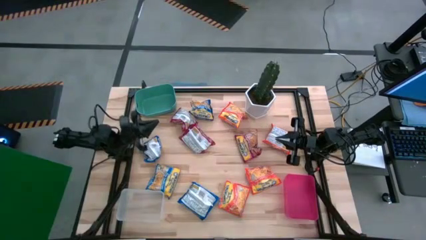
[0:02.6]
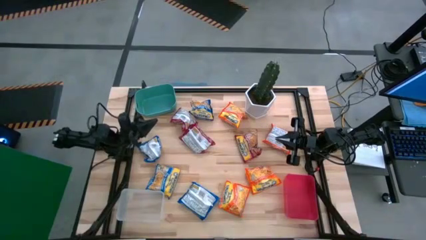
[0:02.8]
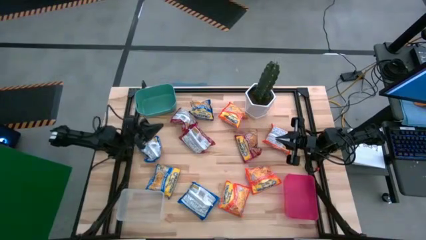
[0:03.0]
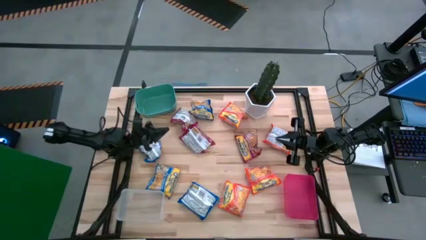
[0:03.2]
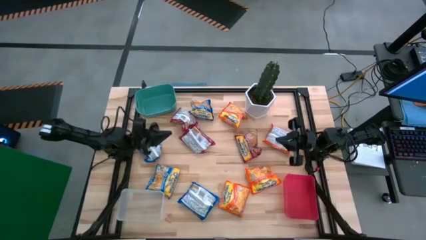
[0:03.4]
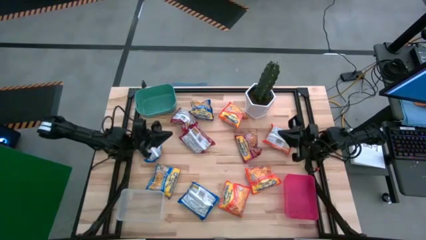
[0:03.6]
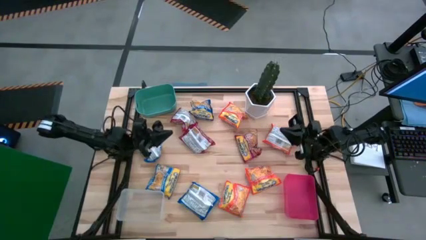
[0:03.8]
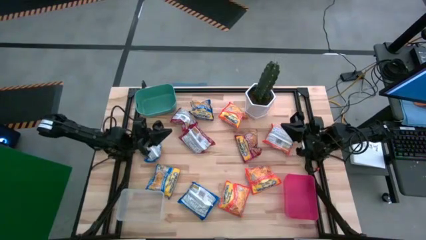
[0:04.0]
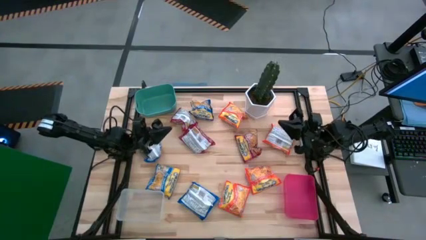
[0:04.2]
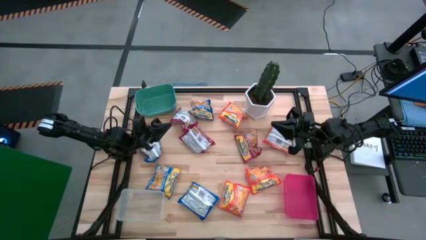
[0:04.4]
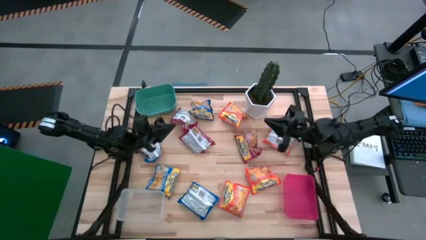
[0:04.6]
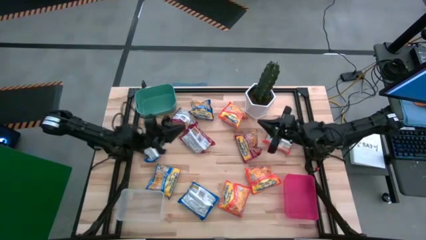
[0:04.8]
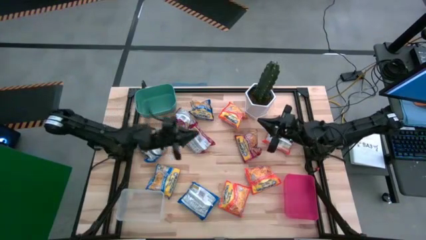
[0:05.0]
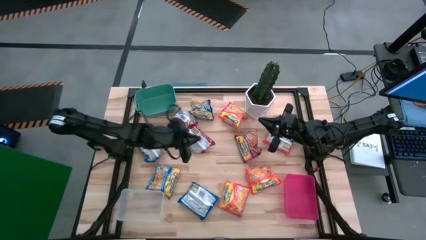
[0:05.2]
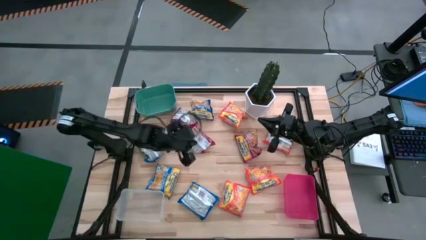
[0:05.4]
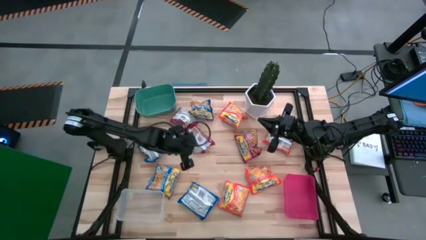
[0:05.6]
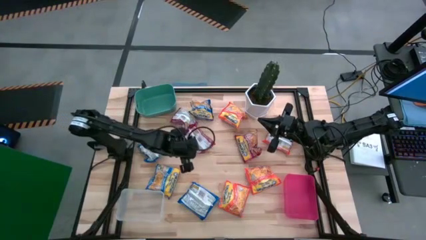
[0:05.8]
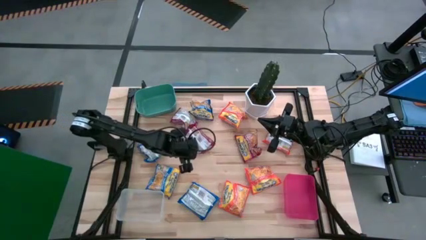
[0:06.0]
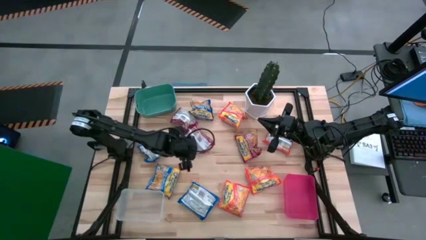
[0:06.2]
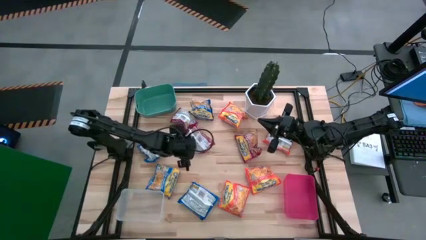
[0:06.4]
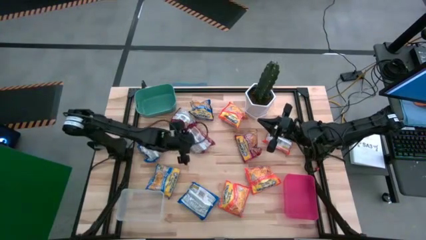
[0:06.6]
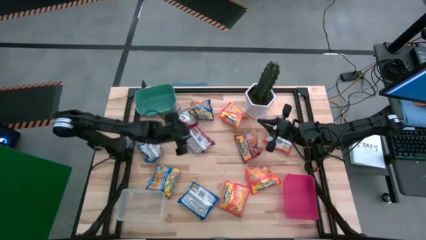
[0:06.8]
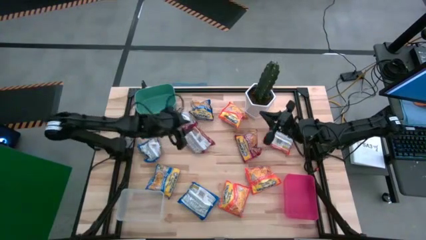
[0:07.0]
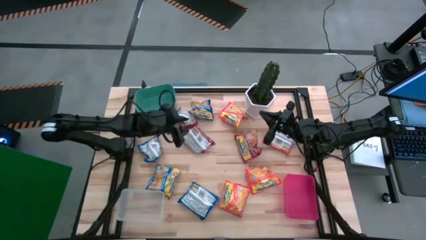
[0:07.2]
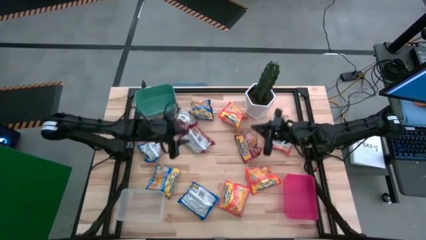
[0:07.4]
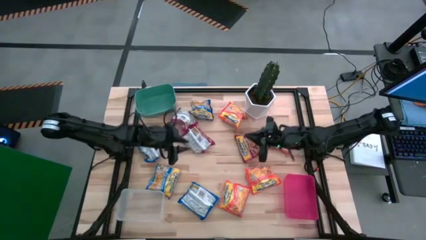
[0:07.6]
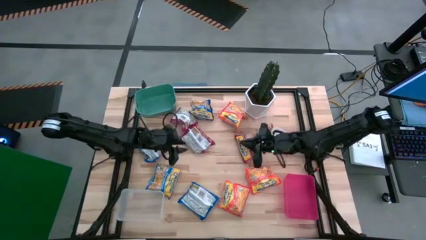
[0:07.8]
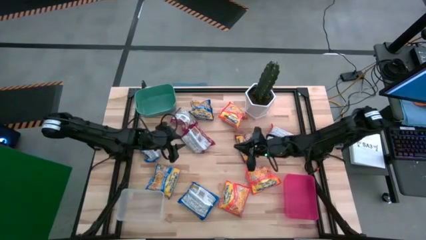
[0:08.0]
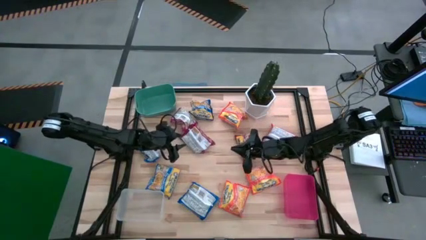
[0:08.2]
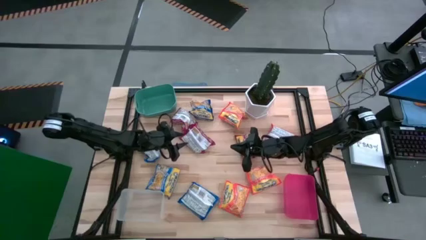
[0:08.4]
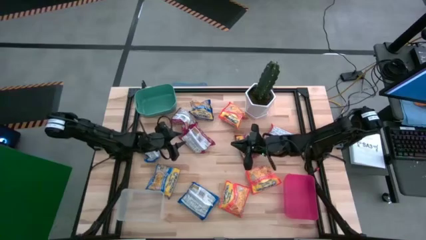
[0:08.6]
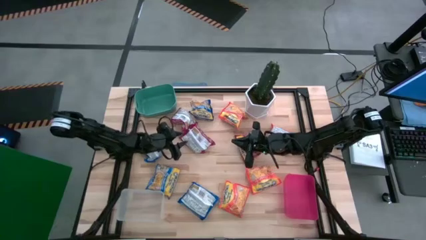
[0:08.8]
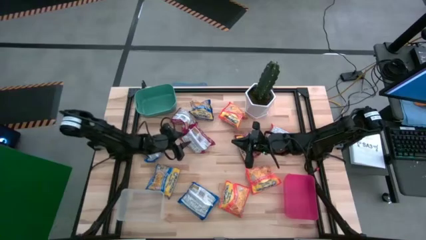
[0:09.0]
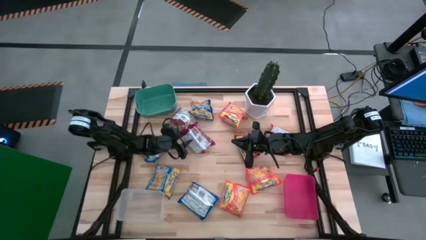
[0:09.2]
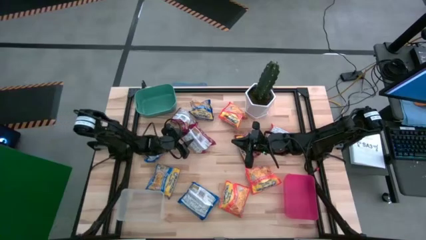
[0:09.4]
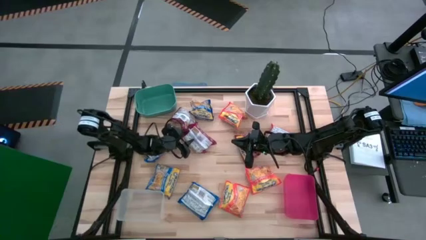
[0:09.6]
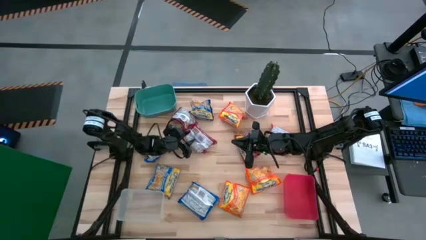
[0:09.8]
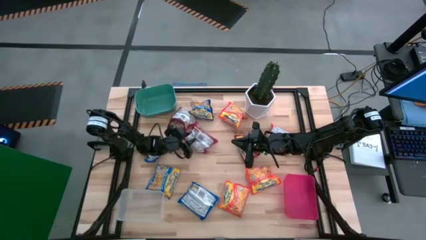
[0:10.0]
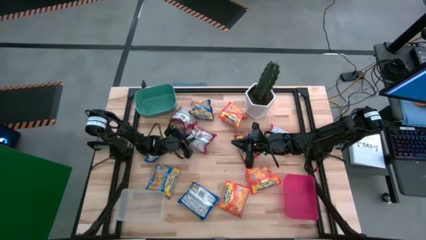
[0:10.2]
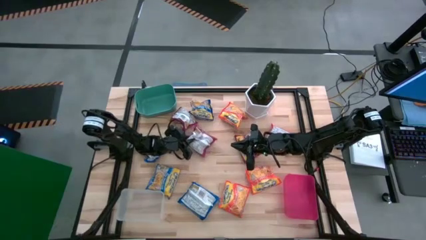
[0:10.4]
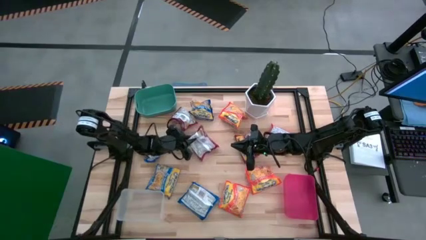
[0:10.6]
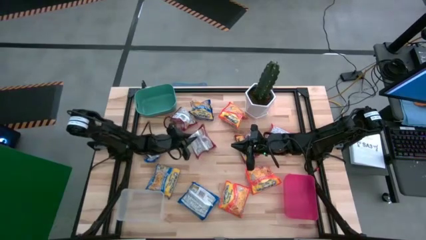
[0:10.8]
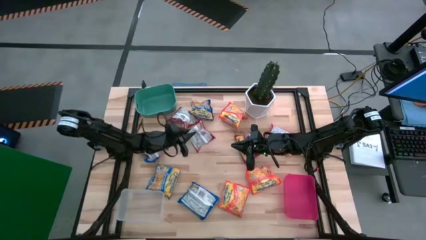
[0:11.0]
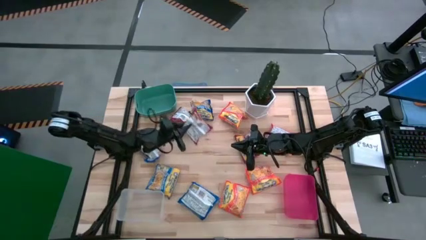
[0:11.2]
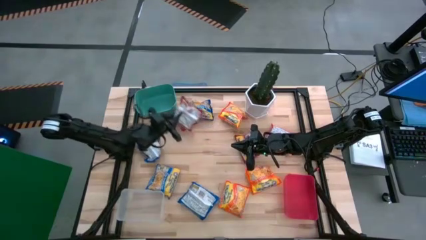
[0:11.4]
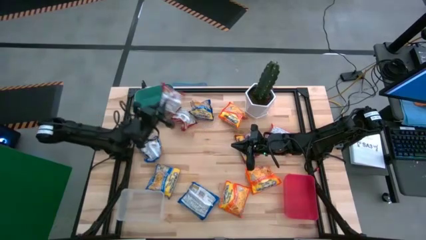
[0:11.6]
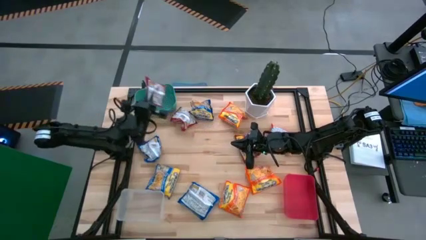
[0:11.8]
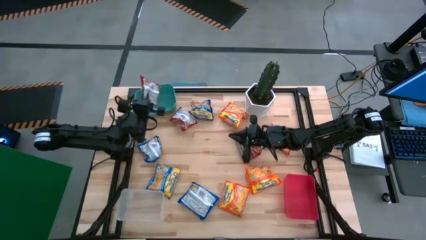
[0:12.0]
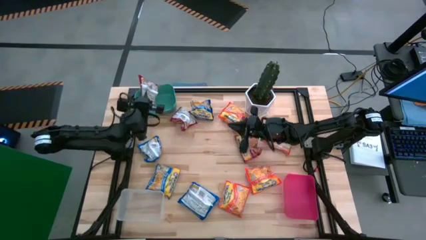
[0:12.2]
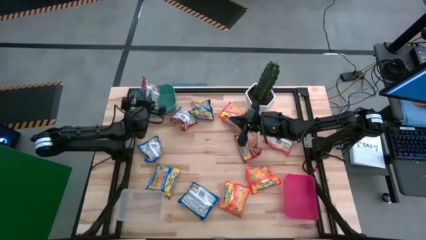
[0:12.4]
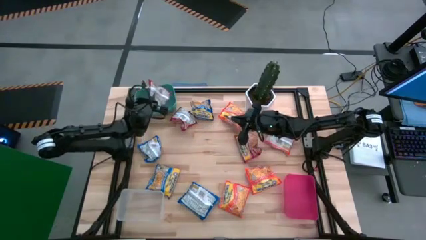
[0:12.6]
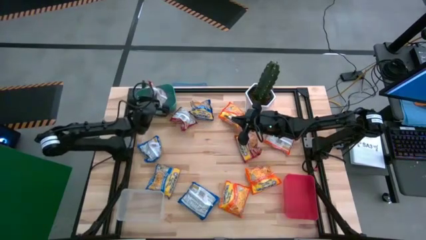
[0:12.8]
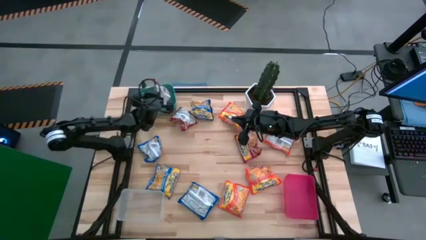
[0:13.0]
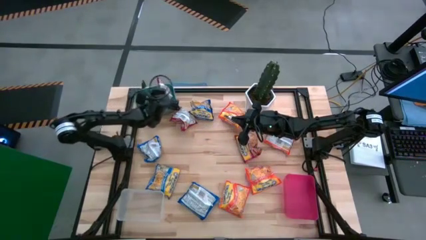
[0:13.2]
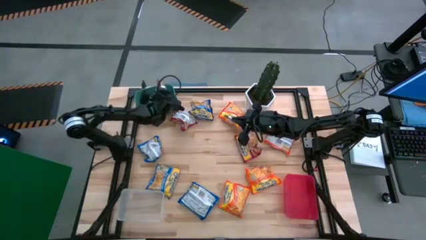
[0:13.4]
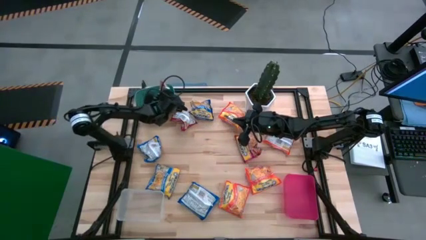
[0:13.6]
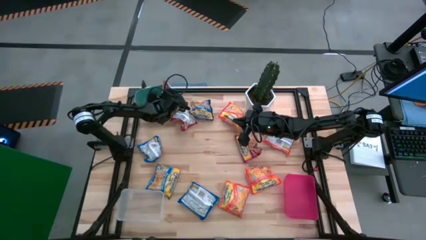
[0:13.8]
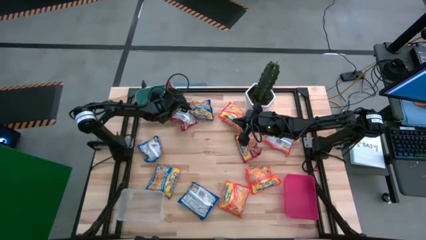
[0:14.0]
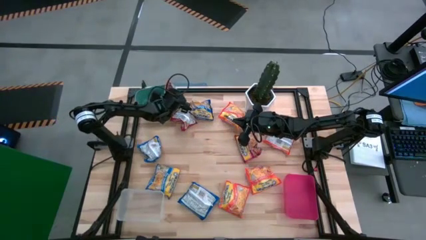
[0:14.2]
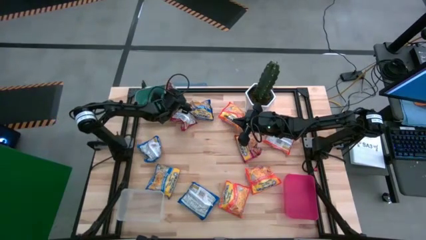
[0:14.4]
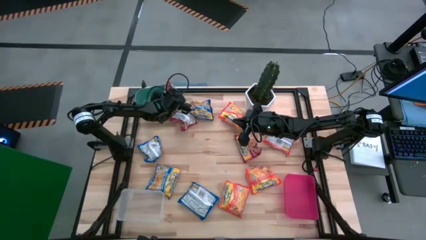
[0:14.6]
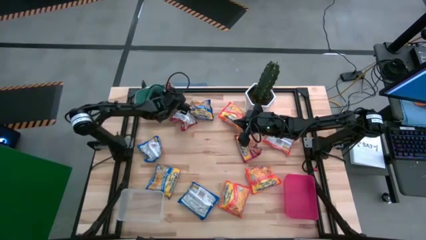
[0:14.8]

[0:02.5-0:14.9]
Task: Sort Maruchan noodles
Put the middle red noodle pack into the green bin

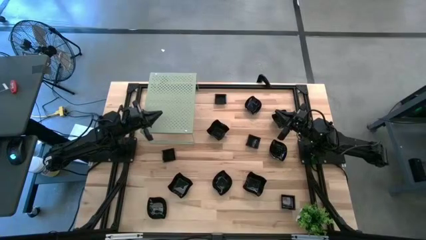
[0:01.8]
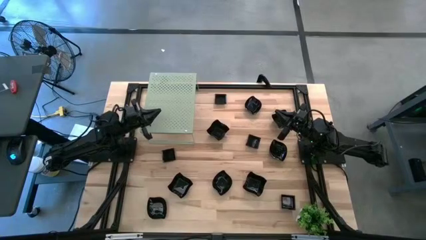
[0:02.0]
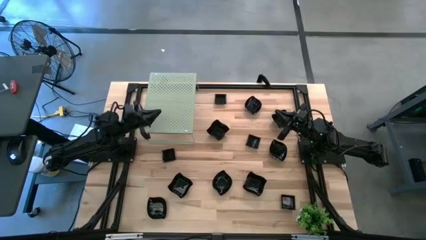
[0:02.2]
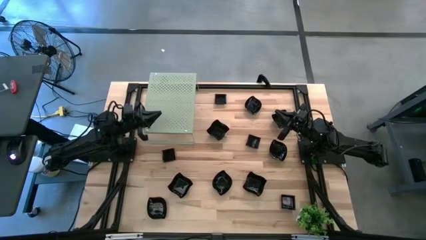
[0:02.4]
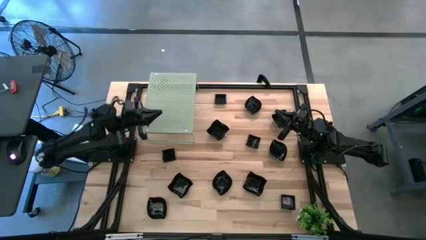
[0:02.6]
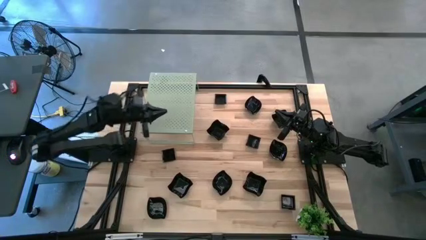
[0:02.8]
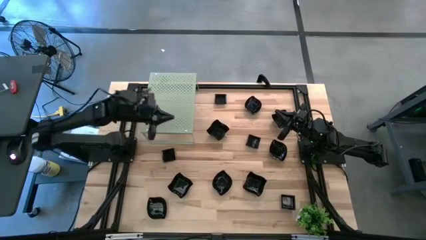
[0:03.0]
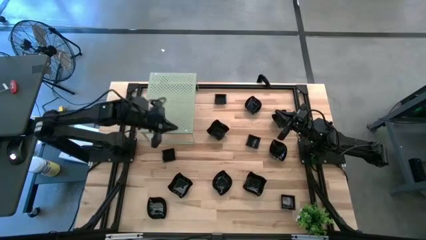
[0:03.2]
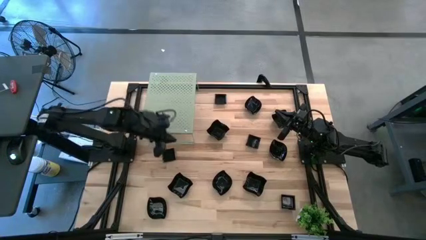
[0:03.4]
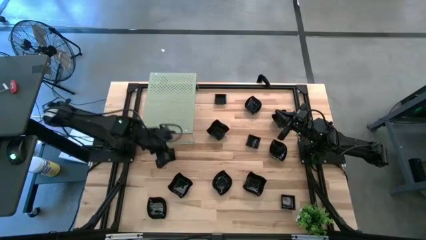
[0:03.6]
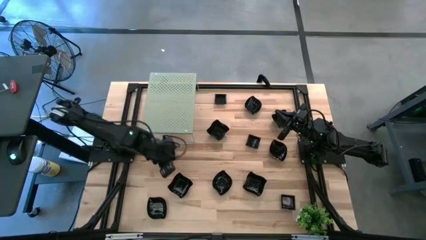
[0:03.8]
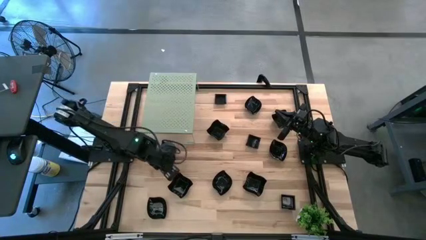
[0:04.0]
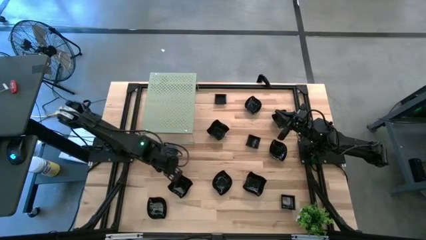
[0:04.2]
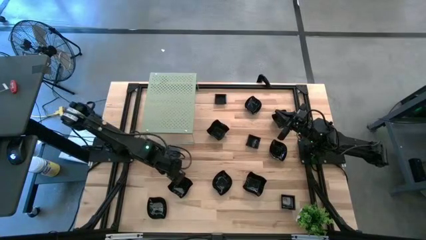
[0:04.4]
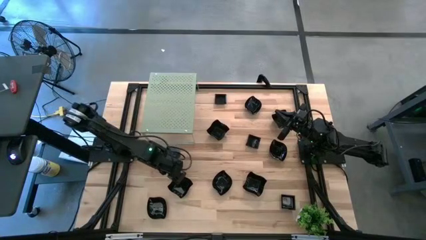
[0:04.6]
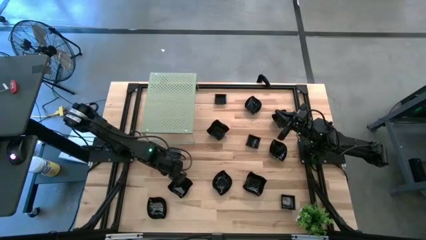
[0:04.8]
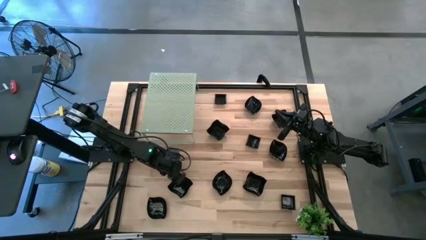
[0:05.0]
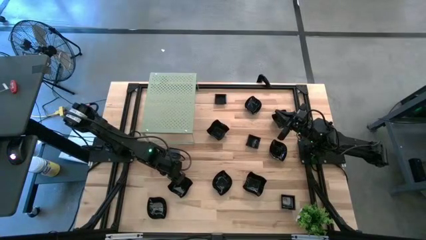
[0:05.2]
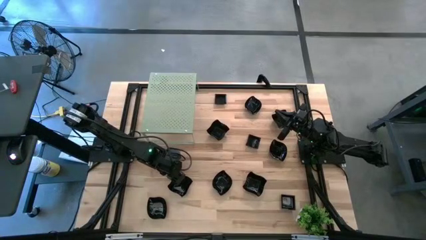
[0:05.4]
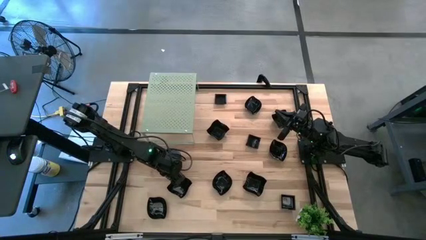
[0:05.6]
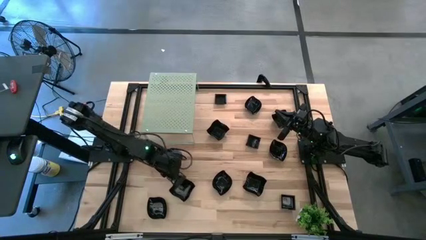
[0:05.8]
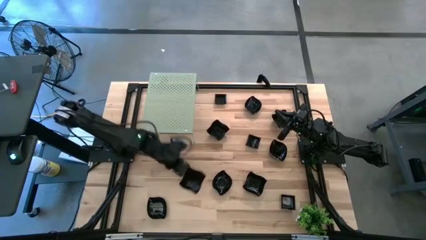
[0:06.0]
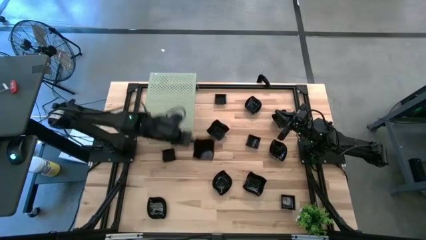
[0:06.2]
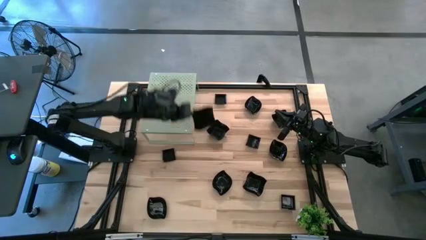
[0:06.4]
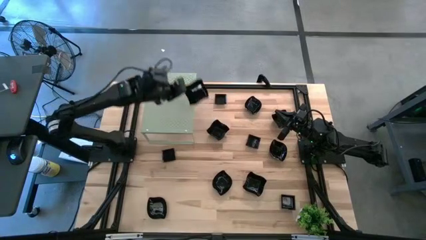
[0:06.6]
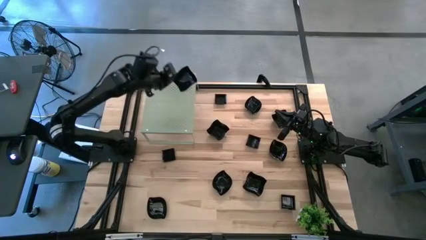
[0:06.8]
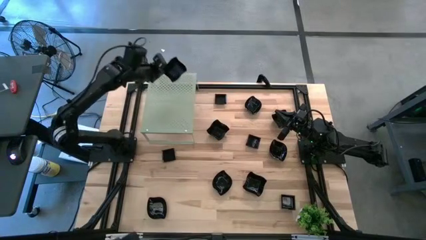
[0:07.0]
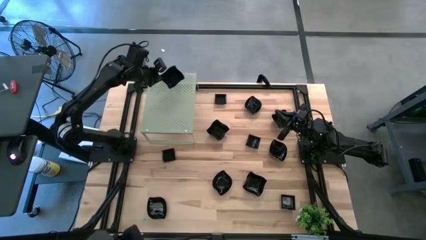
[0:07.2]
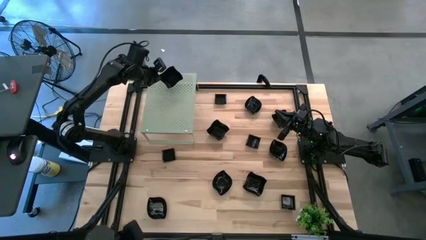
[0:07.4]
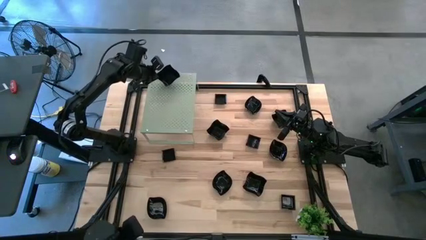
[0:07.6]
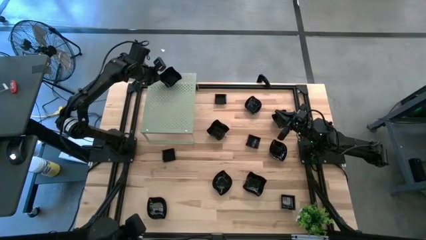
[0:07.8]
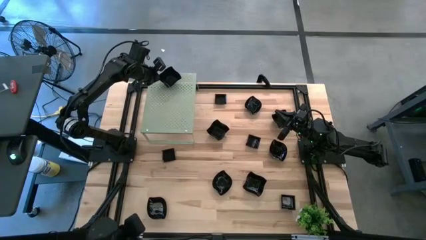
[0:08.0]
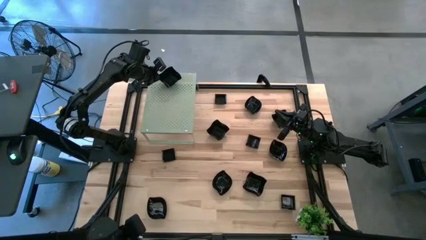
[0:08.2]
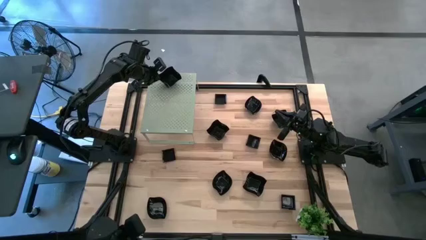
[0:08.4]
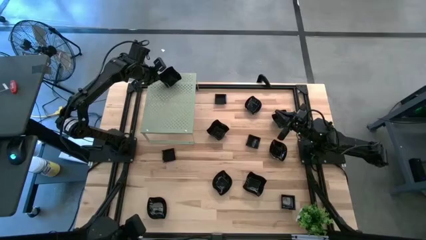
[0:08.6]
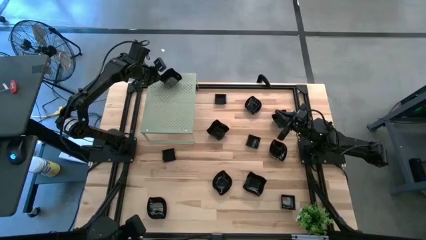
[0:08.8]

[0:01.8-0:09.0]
Task: Pick & Place Mini shaped plates
Put the distorted square plate on the shelf
